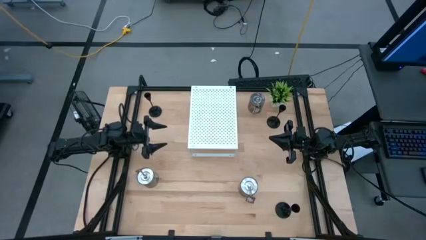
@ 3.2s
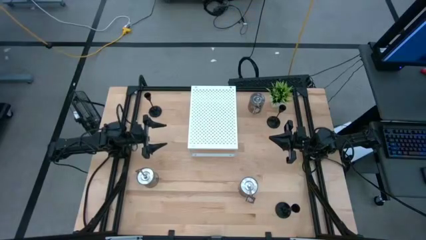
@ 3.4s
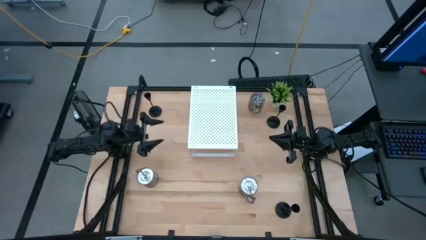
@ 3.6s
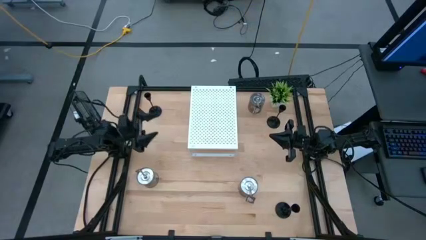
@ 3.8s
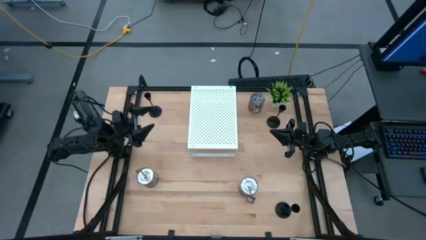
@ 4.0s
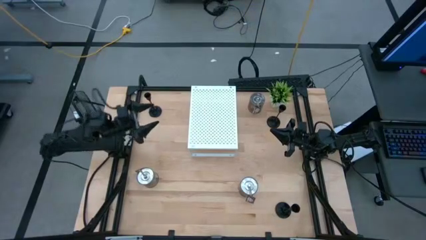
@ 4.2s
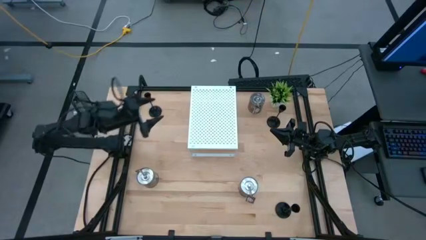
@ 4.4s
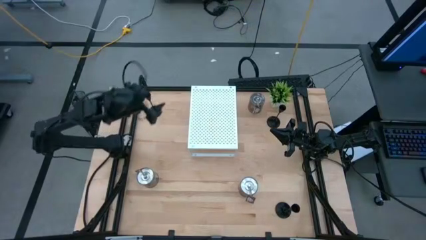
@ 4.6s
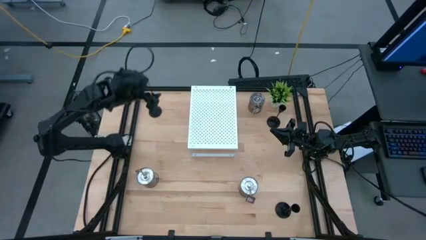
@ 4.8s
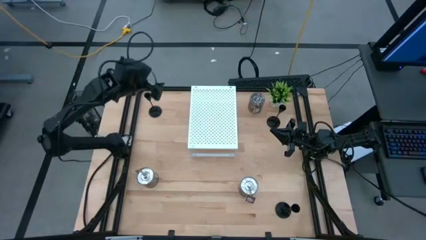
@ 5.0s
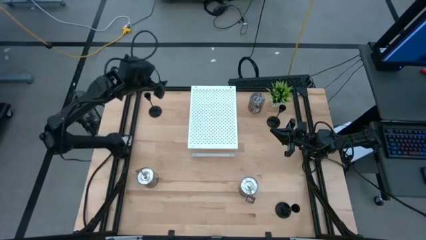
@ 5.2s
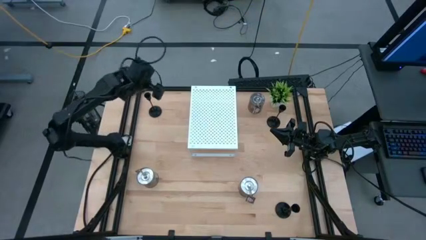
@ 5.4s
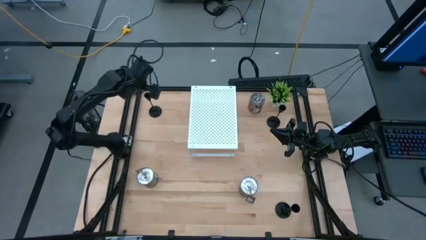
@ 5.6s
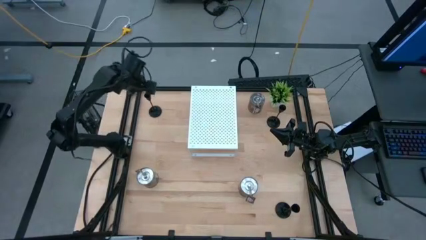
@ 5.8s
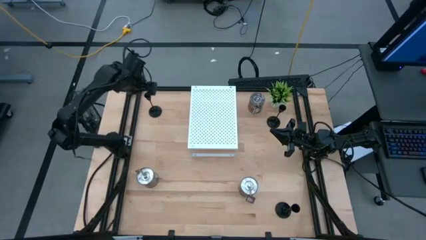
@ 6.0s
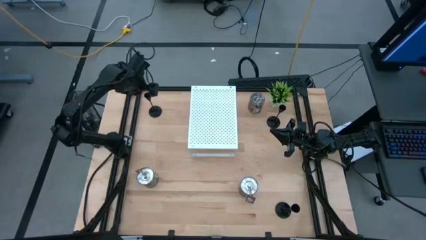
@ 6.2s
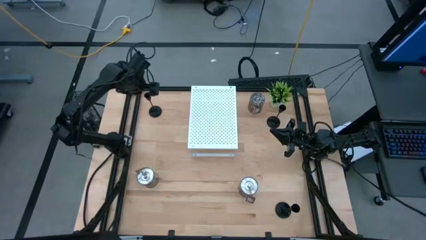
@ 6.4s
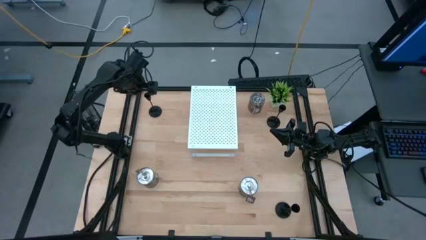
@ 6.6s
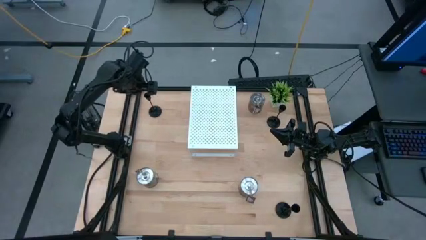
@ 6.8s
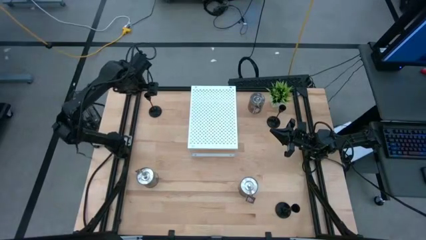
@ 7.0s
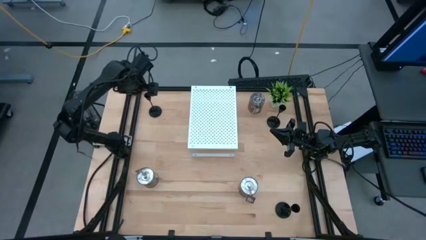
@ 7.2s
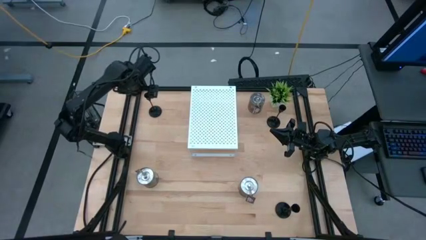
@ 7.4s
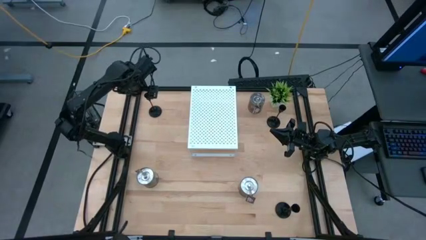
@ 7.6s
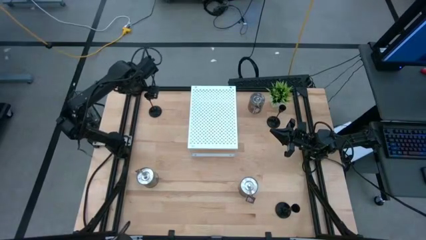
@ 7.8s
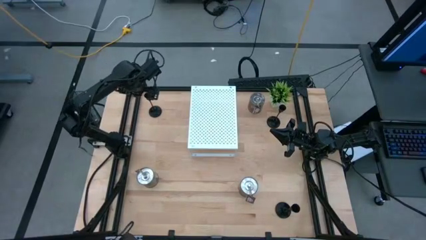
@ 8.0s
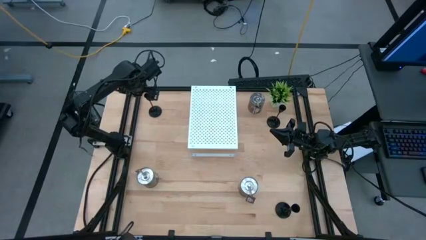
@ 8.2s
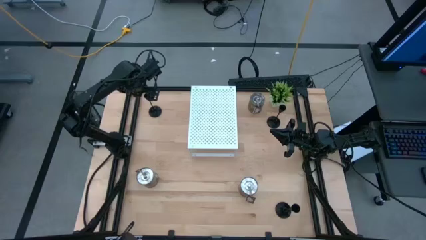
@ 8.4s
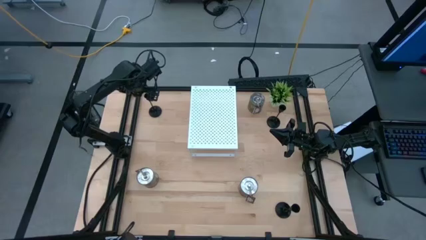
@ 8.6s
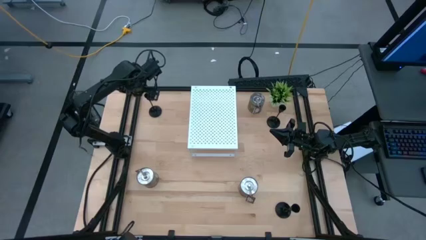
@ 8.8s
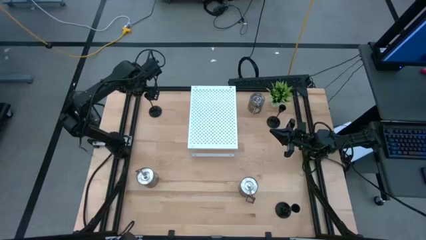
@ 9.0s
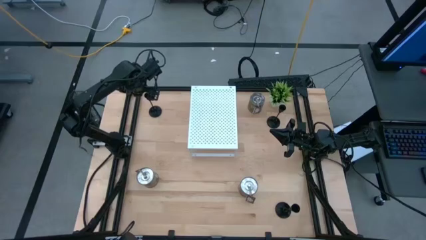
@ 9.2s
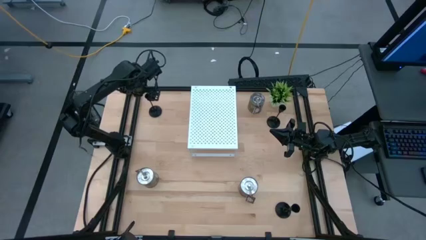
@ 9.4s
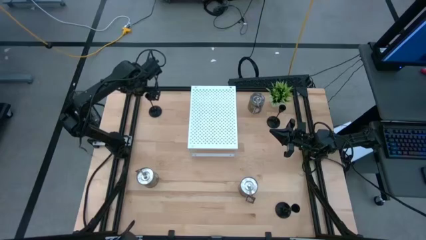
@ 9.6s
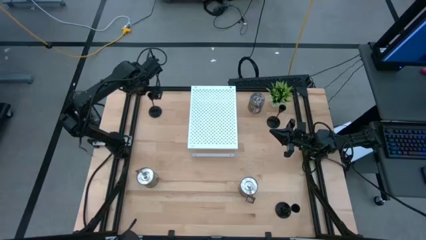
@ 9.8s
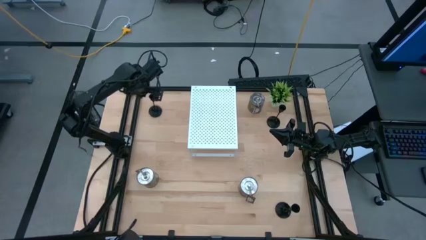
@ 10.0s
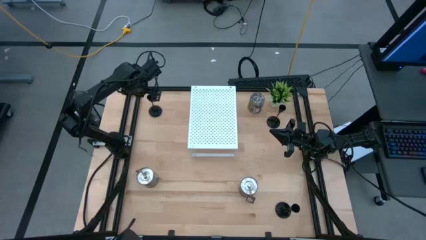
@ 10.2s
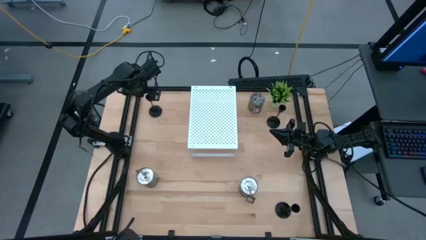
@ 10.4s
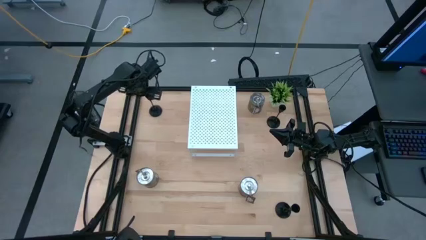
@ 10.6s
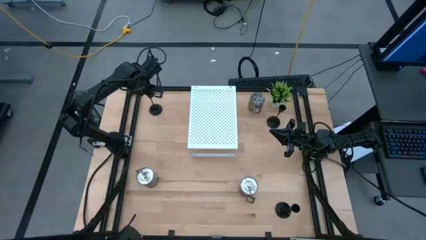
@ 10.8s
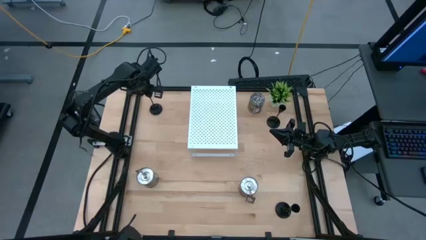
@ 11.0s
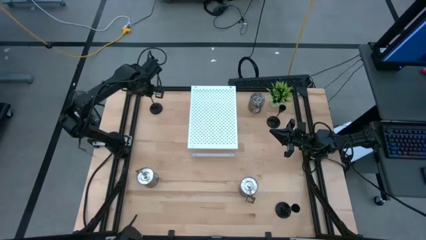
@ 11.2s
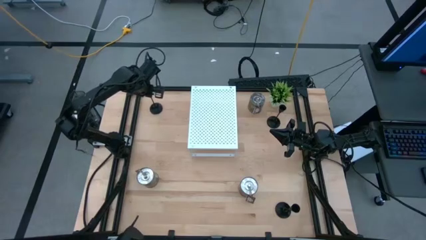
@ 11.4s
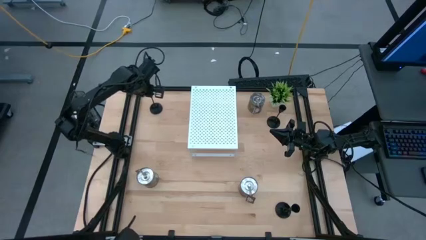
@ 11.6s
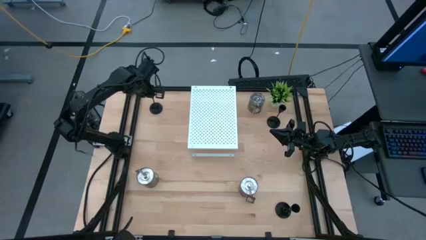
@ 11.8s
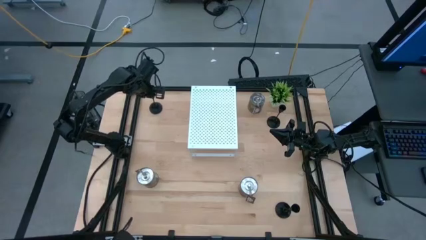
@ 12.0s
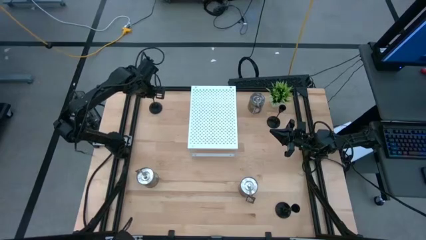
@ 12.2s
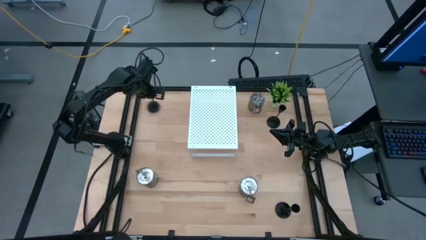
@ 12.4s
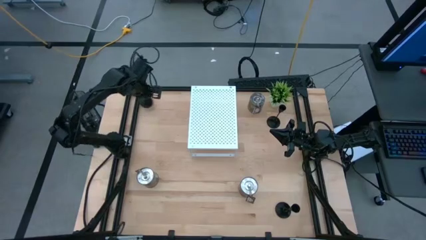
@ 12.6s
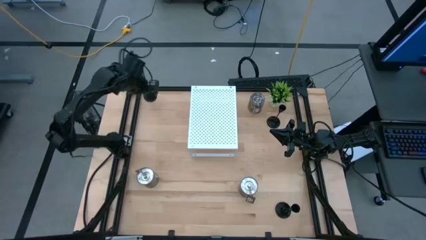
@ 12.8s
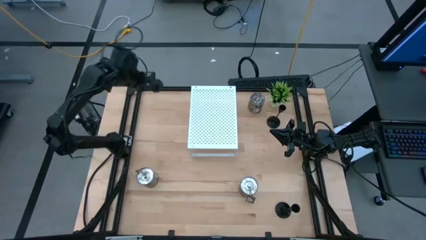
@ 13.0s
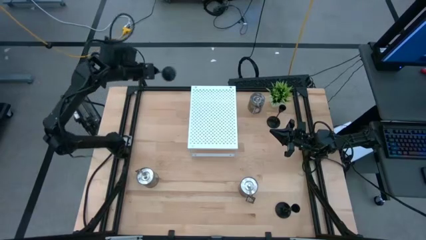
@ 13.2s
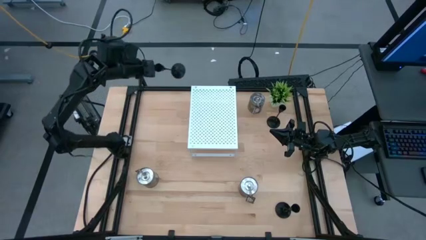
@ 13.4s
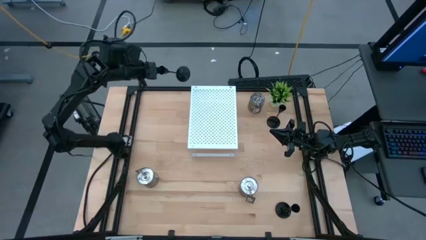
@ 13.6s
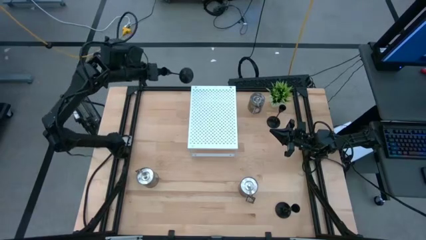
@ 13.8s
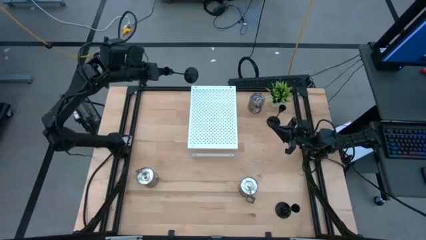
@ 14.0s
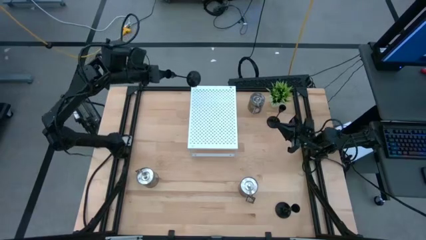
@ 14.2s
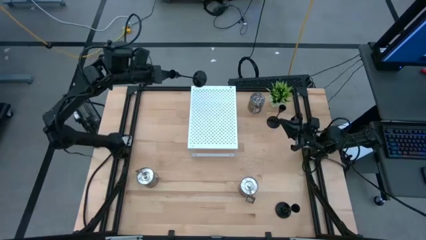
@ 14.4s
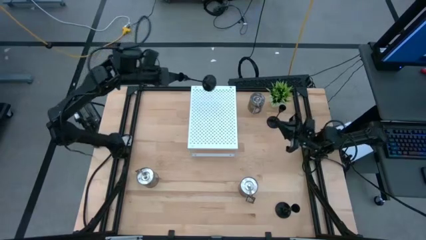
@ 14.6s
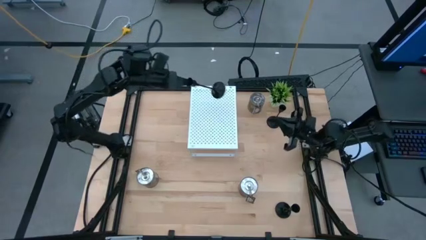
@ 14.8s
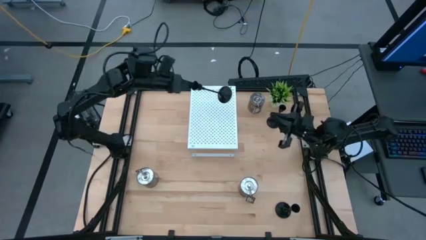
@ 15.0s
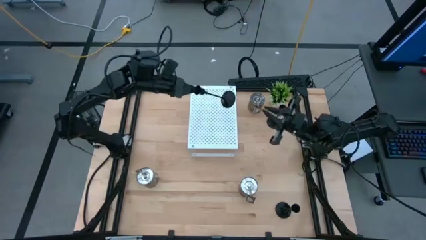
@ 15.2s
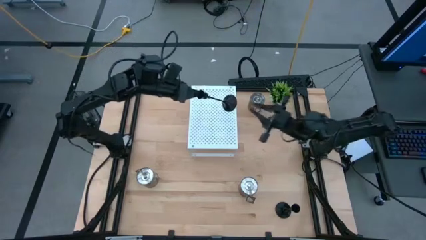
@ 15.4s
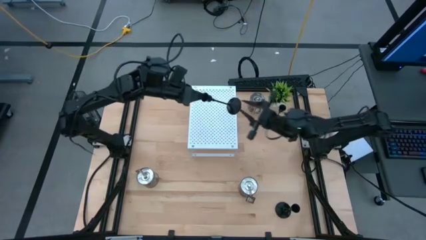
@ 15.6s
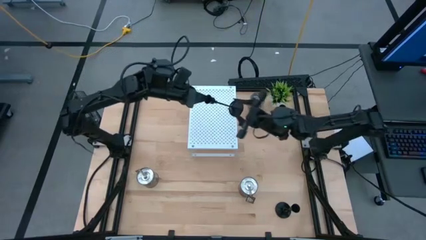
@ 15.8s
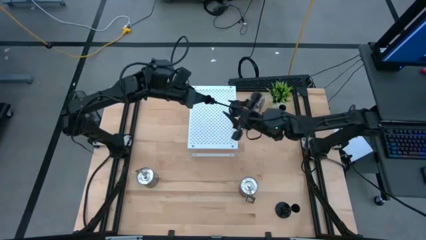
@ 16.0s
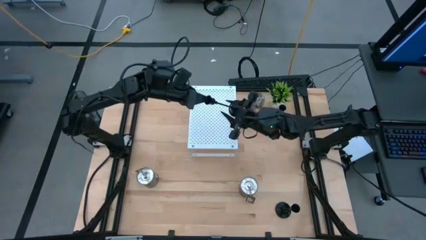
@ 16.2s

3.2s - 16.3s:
Task: Pick & Place candle stick holders
Put the top left black candle holder on the shelf
